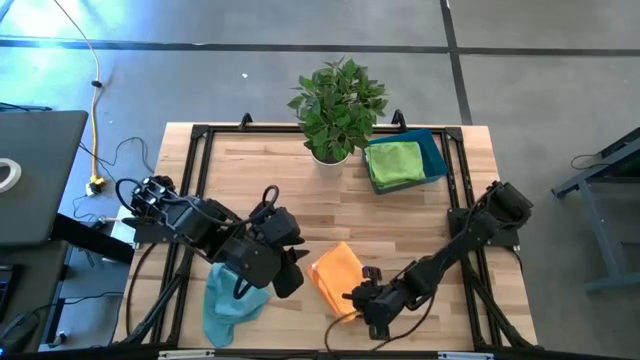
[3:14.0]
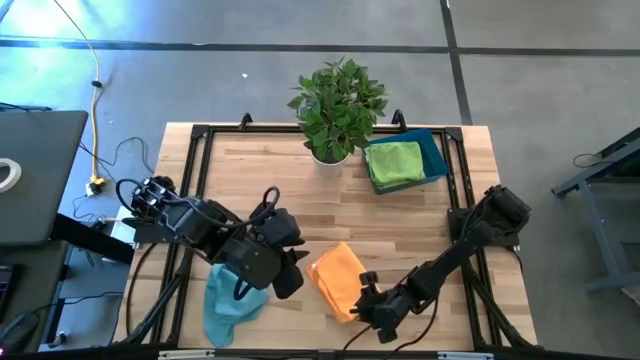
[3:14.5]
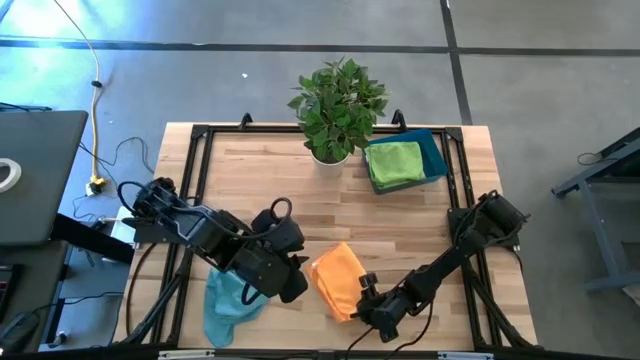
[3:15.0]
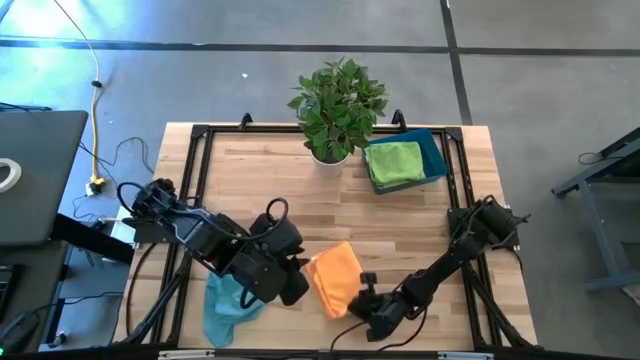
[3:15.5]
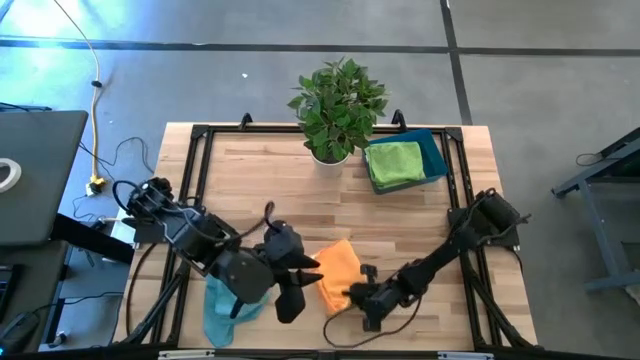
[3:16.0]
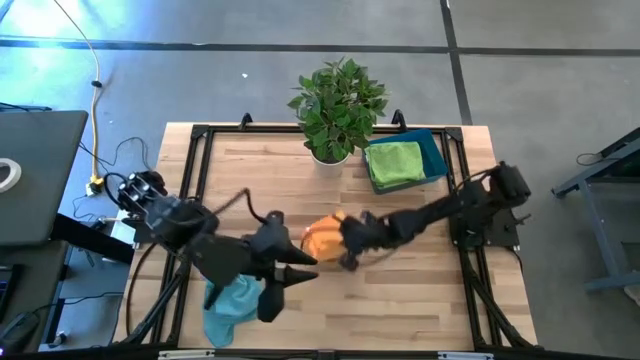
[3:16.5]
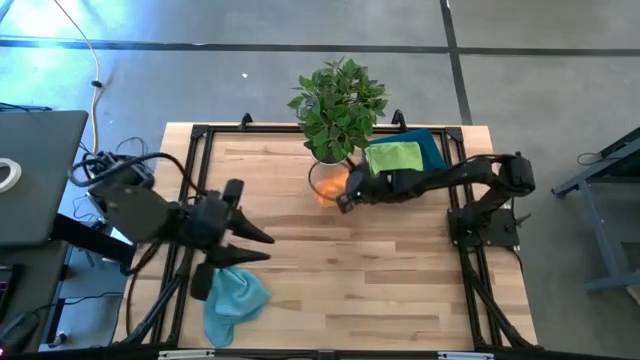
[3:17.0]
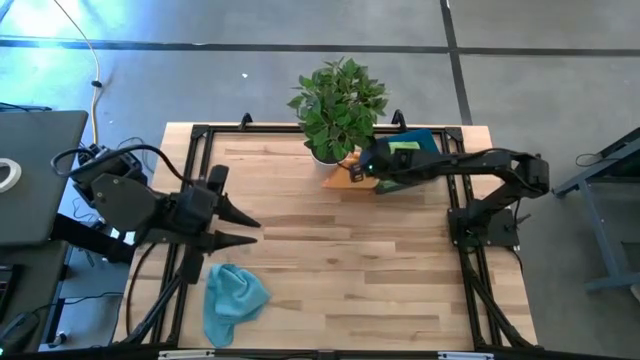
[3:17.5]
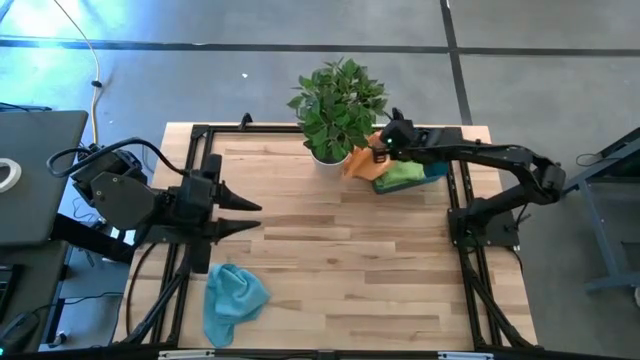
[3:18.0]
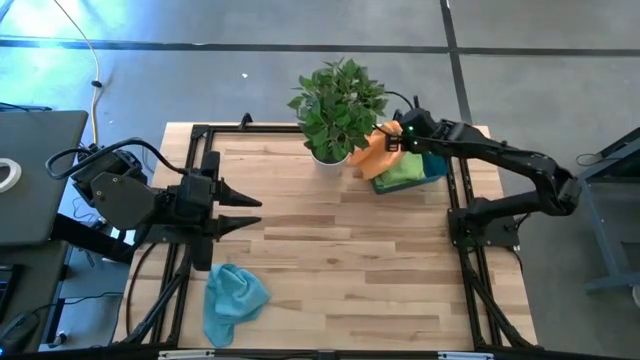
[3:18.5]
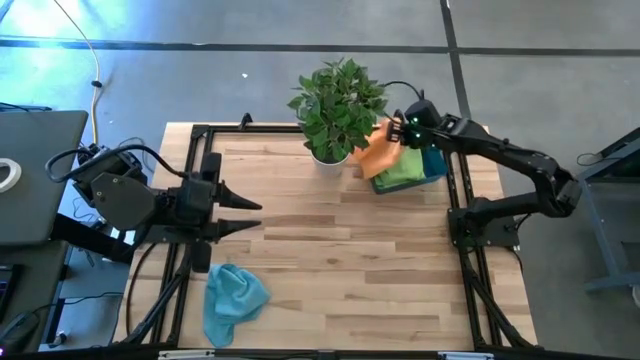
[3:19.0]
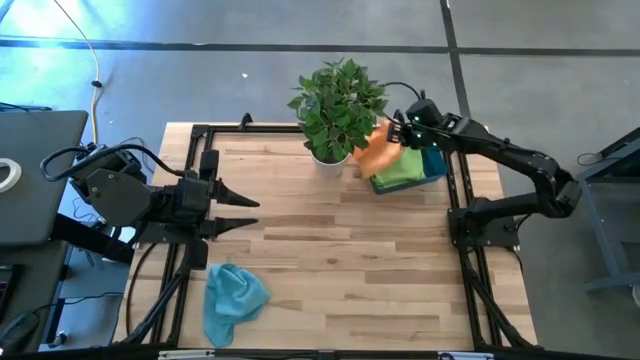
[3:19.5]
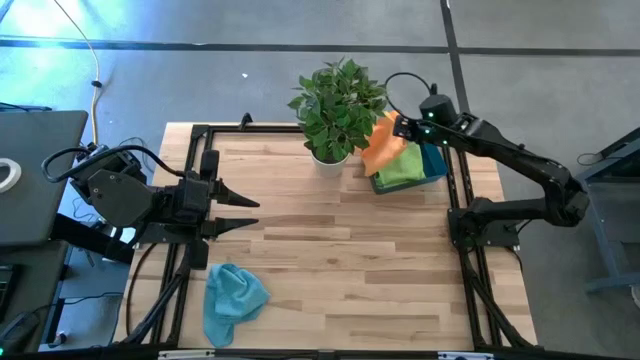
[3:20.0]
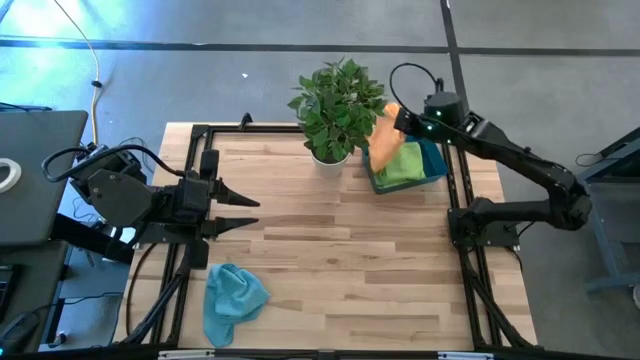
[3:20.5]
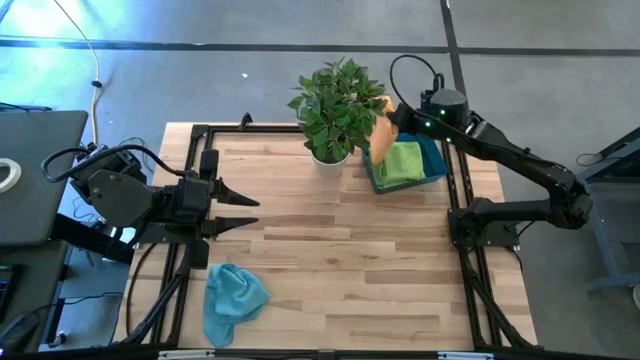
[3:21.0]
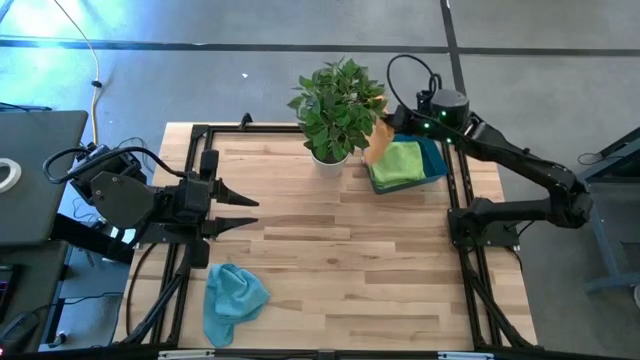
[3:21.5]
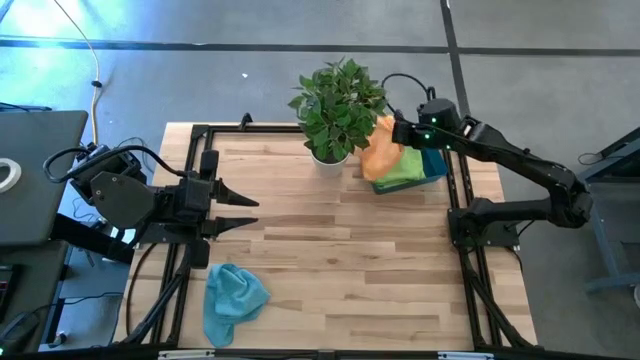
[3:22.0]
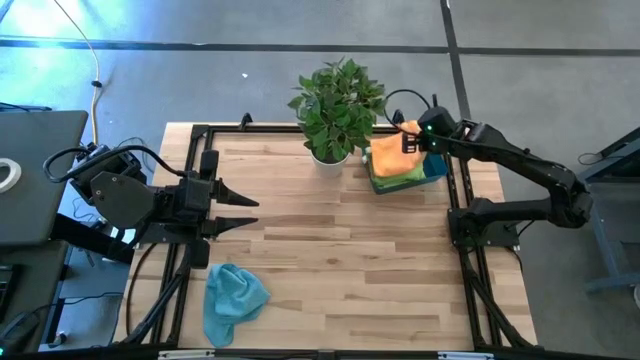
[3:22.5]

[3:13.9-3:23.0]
Task: Sort microfiber towel by color & place in baskets
Stack the orange towel on top of the green towel into the blue bin

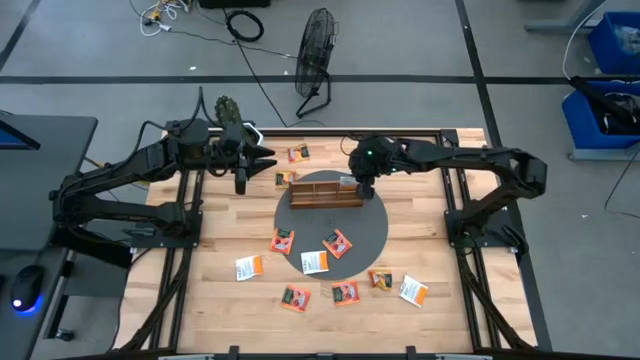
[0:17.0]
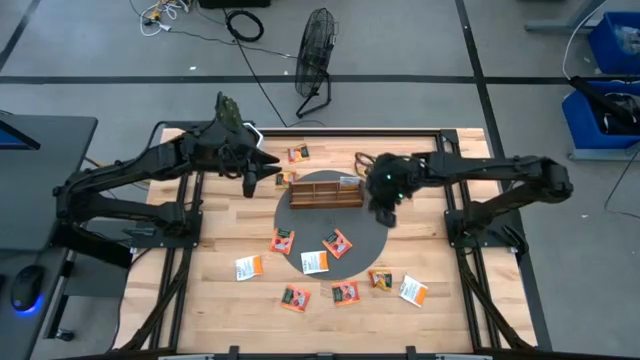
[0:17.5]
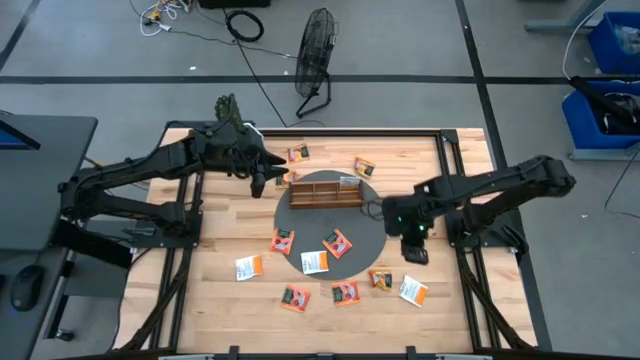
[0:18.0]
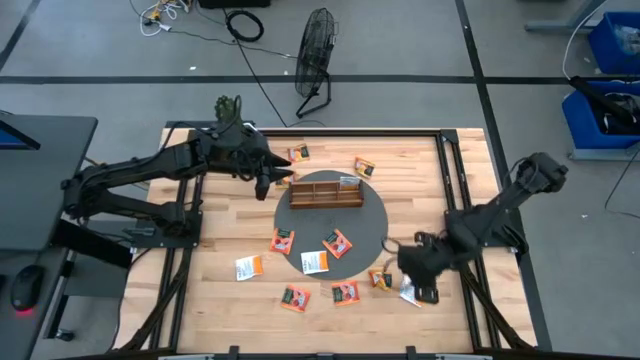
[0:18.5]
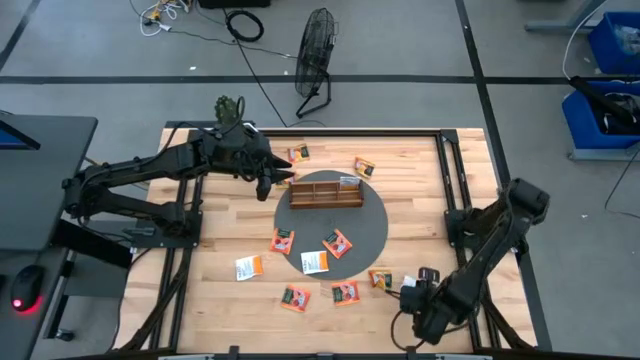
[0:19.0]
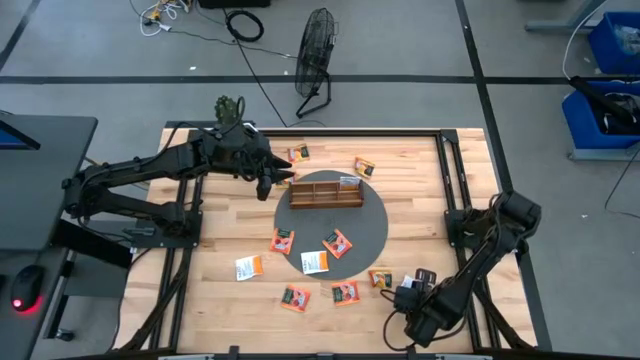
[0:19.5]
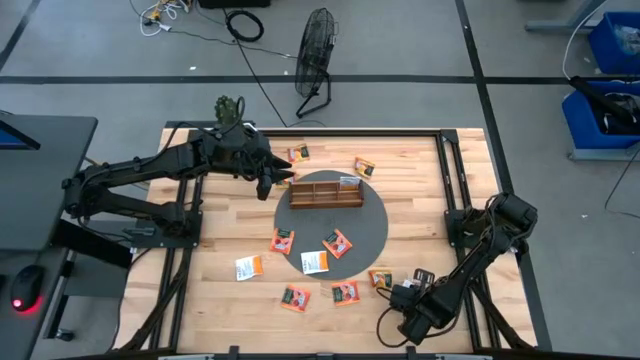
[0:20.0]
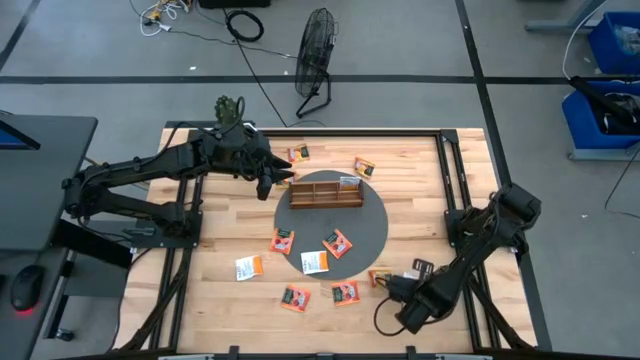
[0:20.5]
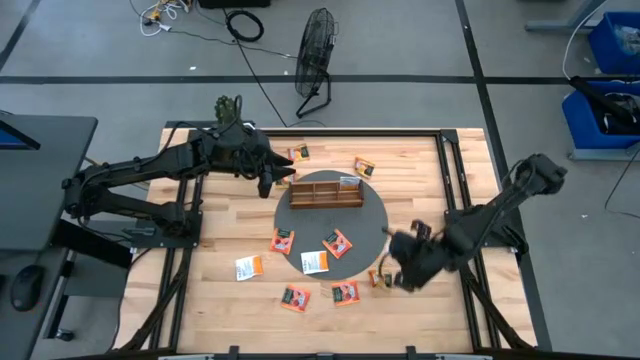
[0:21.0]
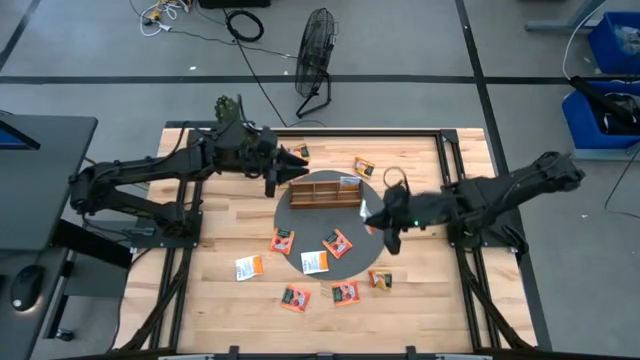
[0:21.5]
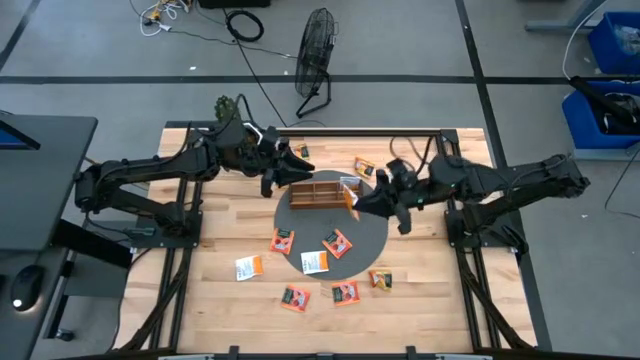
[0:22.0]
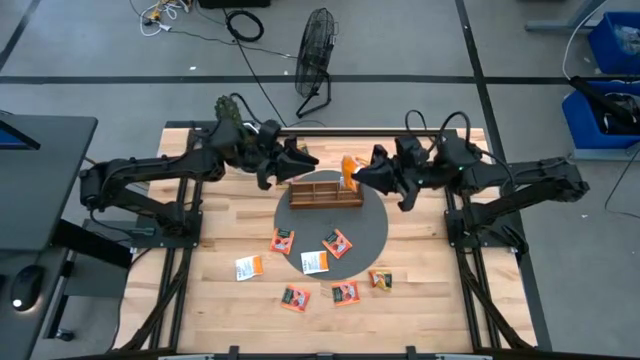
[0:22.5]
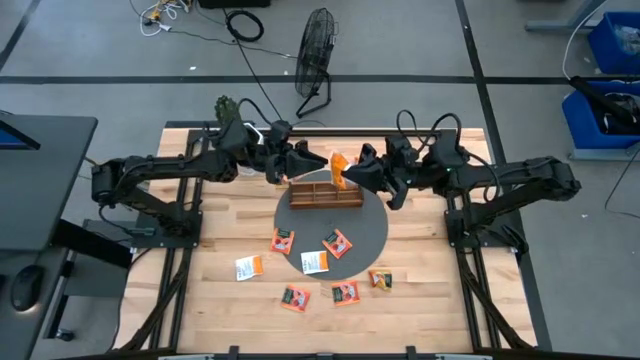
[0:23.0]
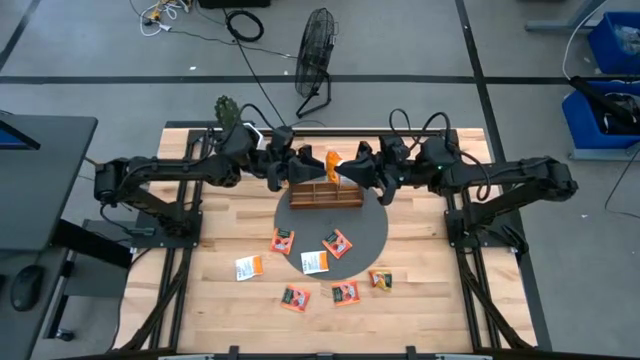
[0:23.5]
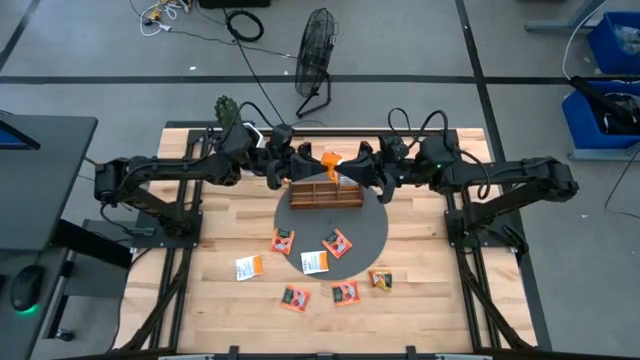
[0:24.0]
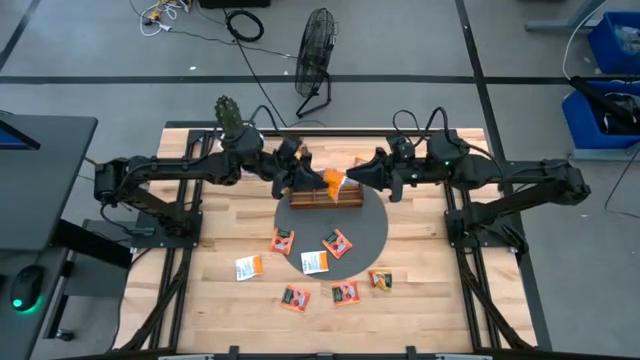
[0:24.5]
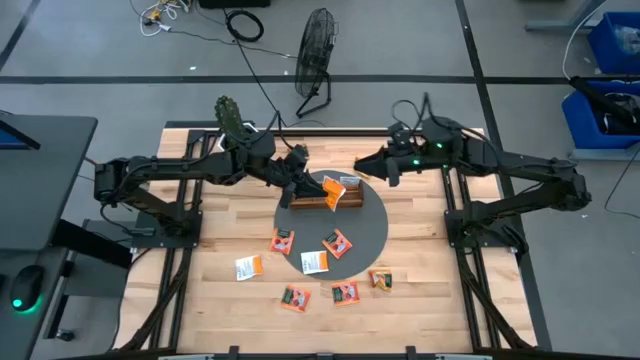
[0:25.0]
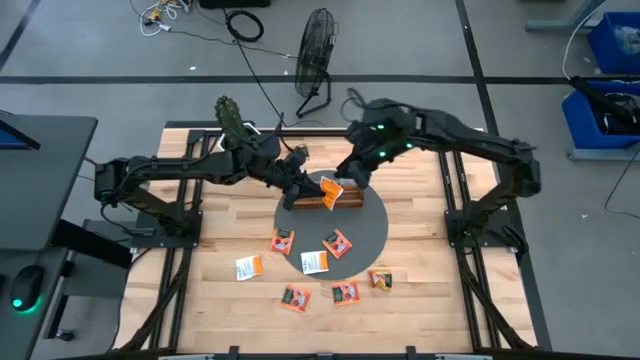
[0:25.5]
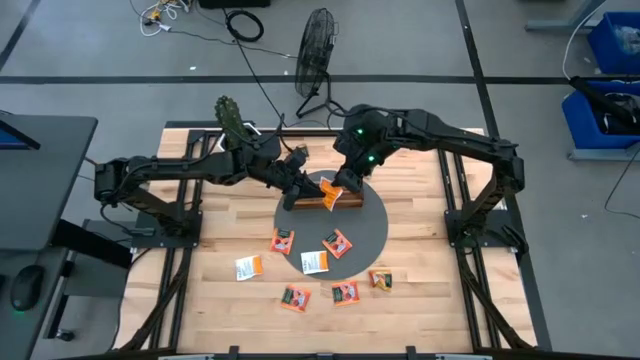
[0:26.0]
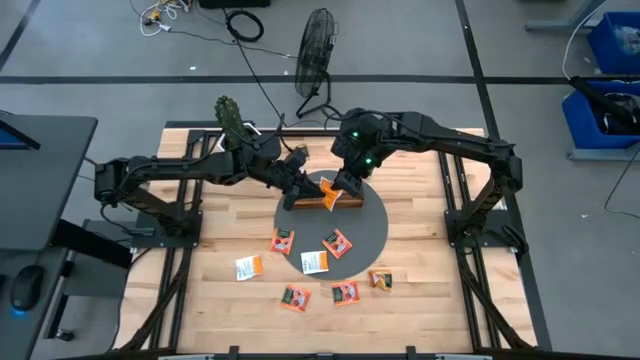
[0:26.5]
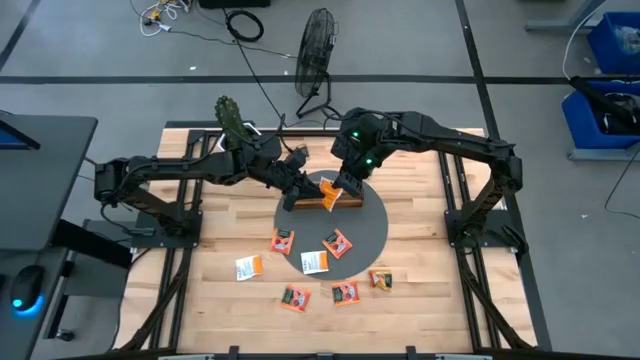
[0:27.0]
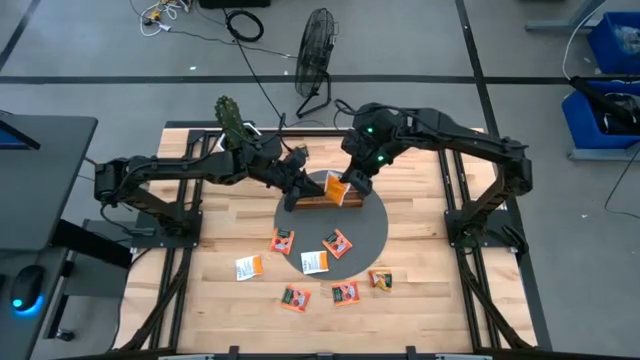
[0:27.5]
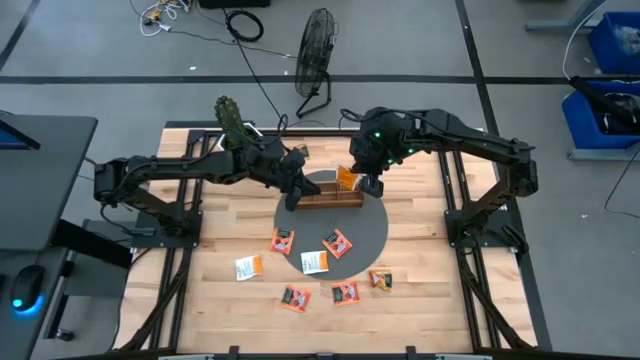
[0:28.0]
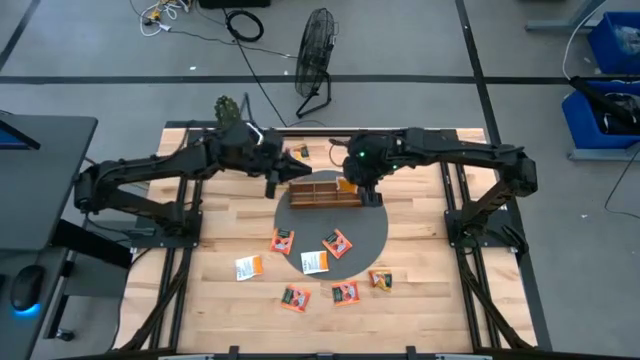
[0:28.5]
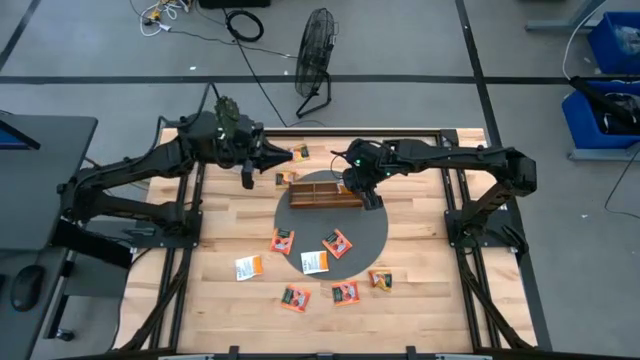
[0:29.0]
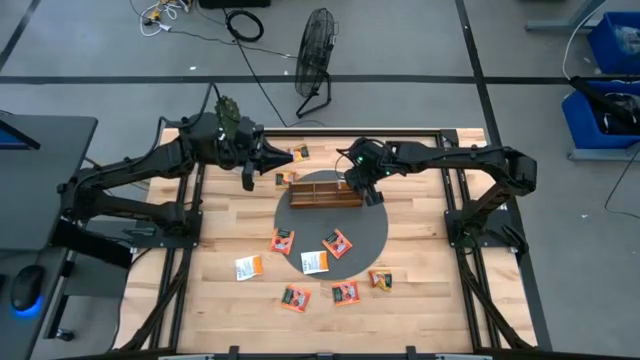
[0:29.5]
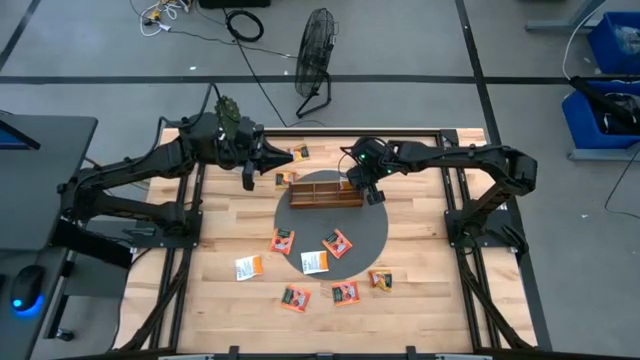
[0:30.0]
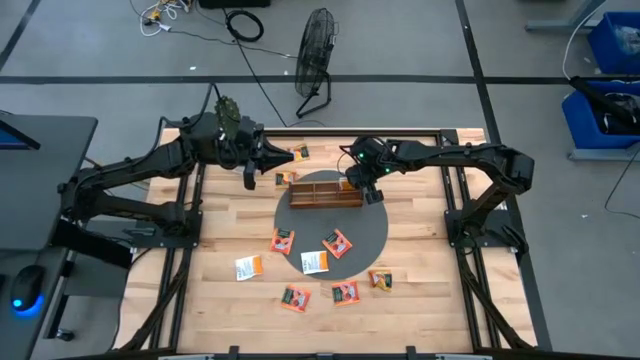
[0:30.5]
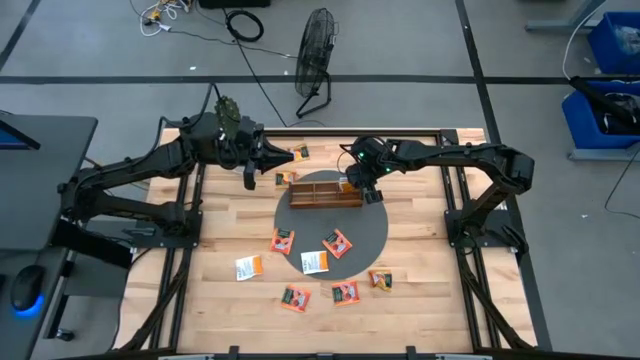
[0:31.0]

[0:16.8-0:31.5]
Task: Pick & Place Tea
Put the white tea bag into the right section of the wooden organizer
